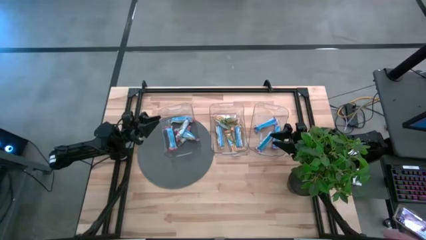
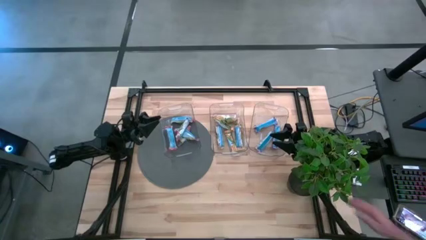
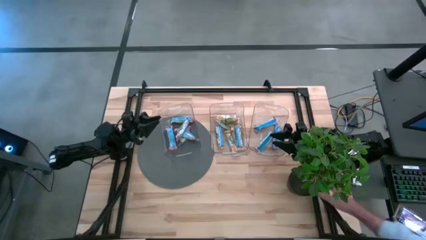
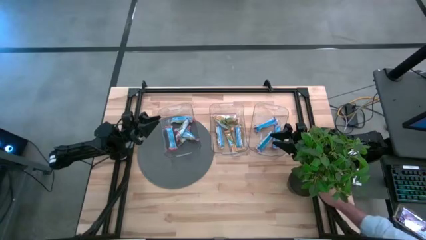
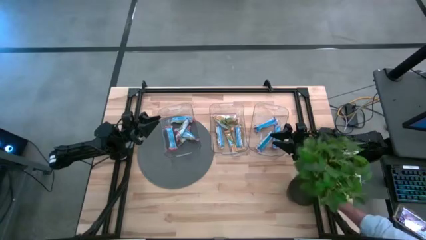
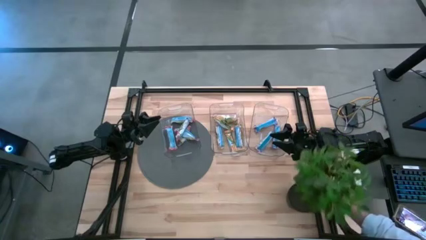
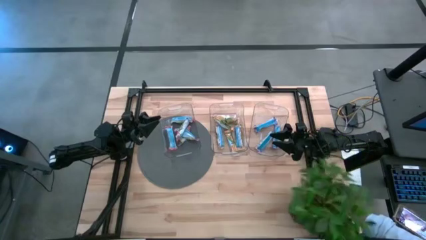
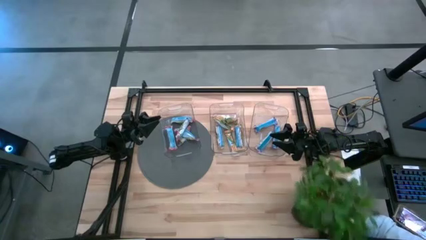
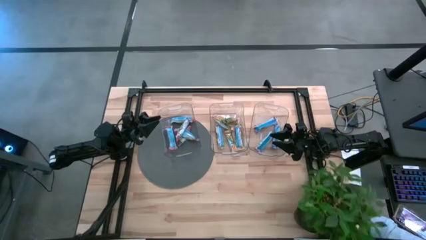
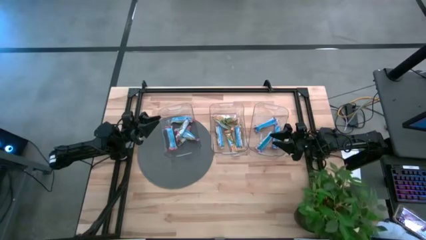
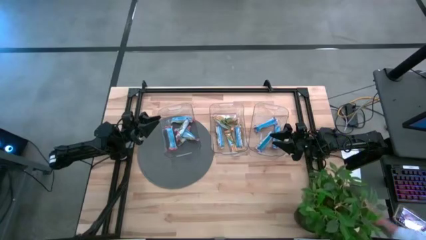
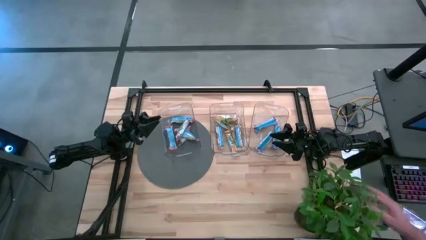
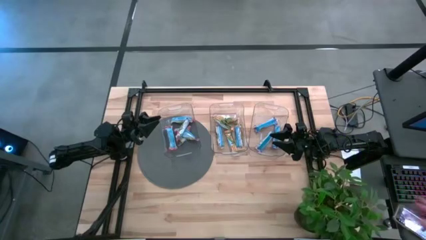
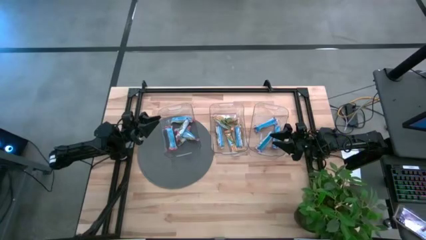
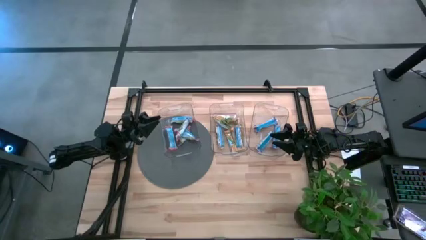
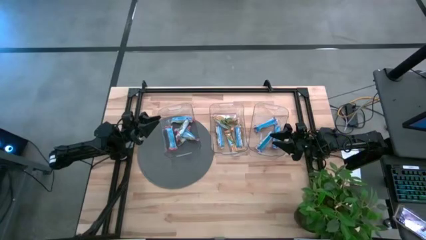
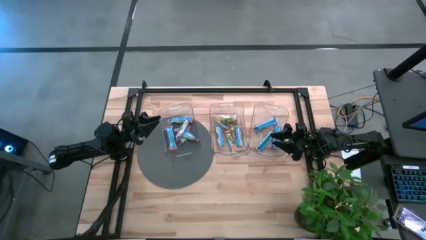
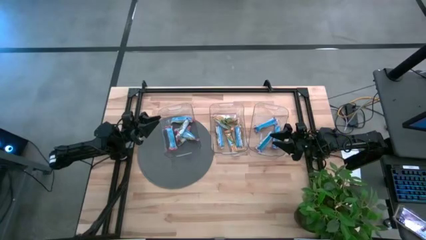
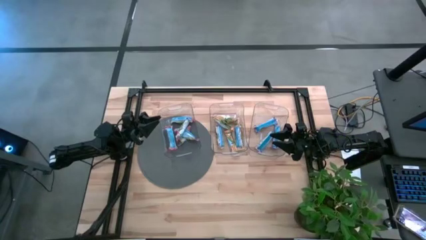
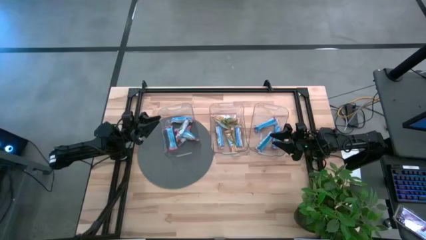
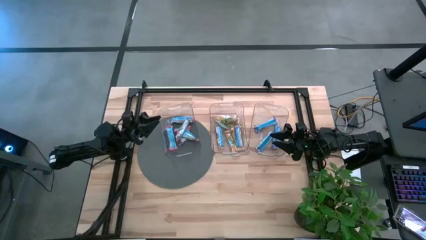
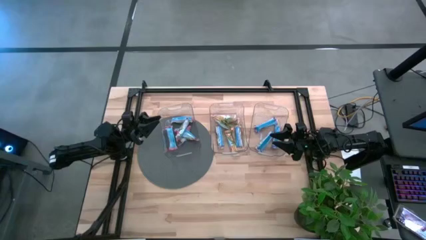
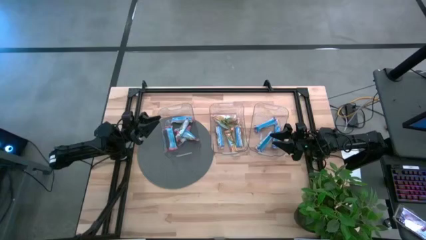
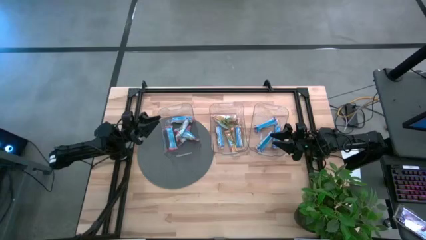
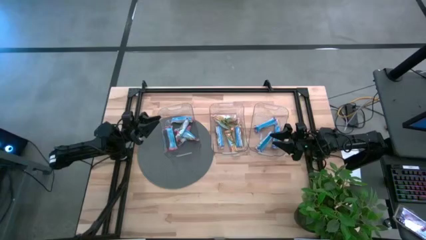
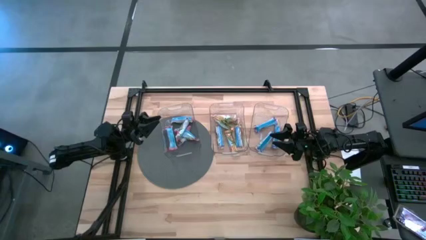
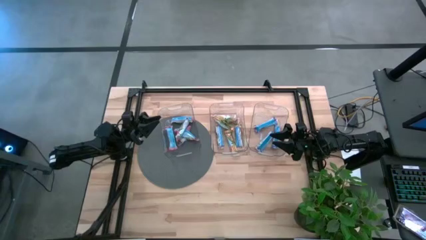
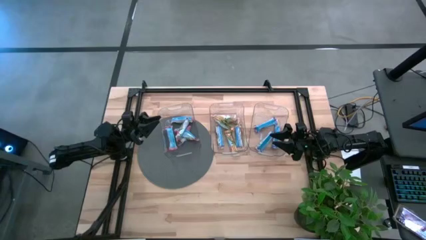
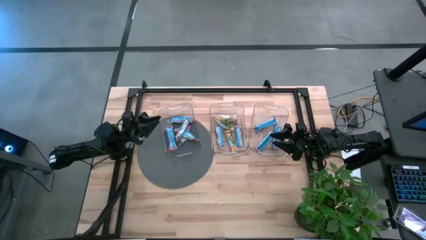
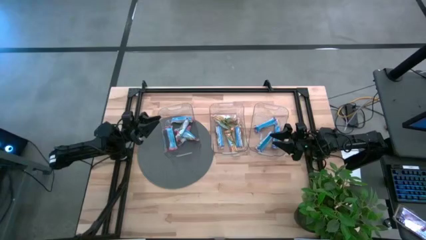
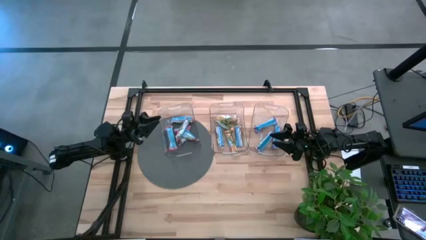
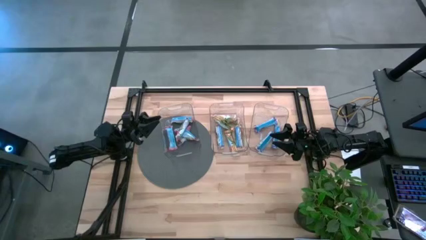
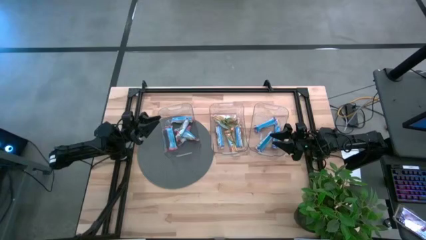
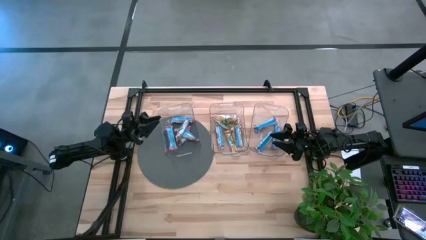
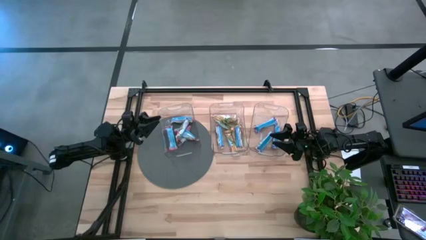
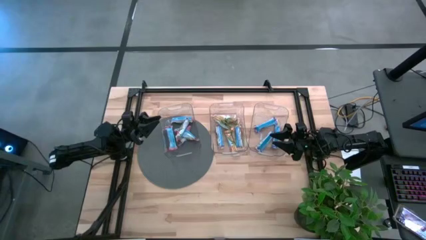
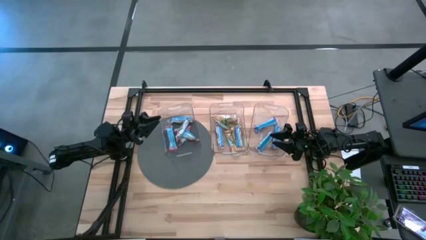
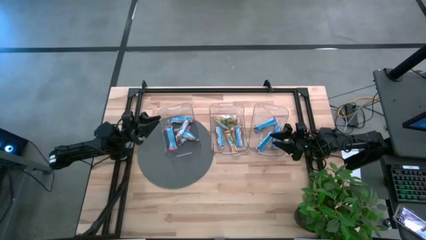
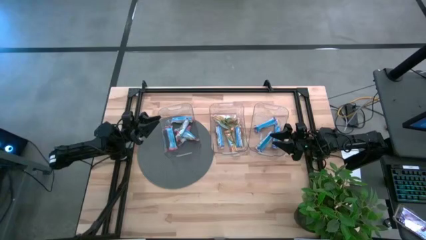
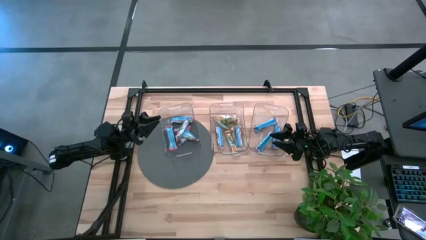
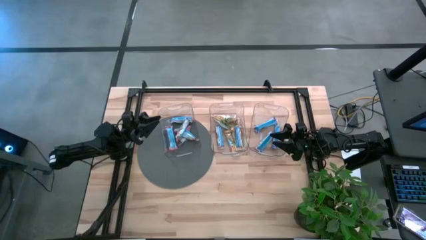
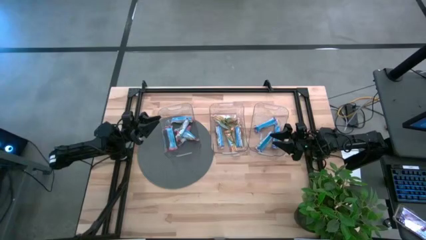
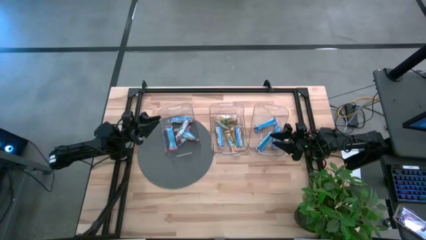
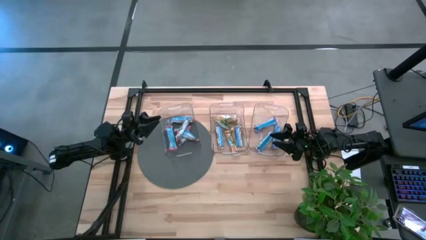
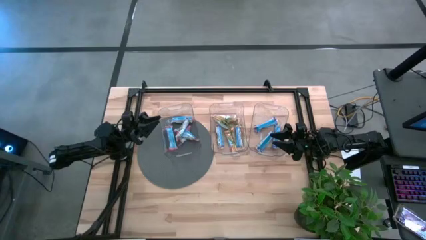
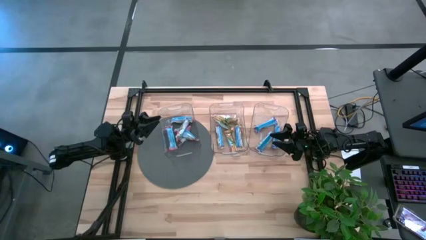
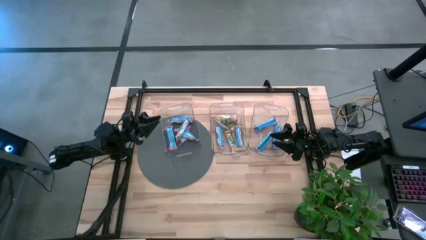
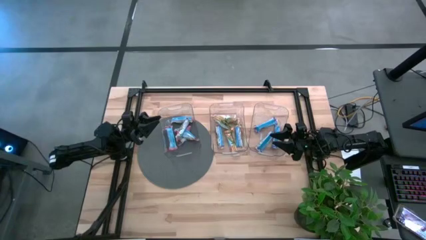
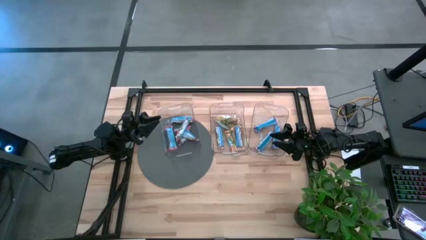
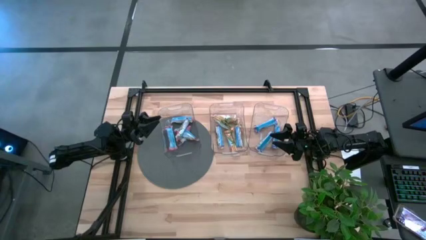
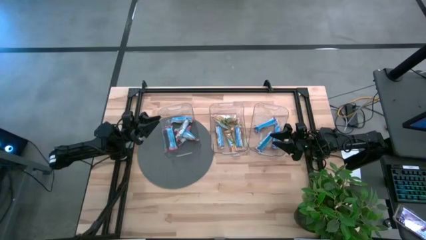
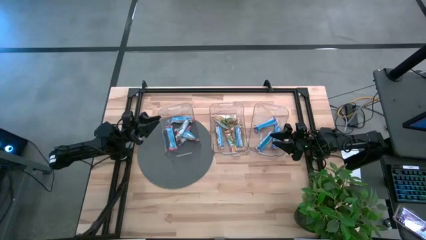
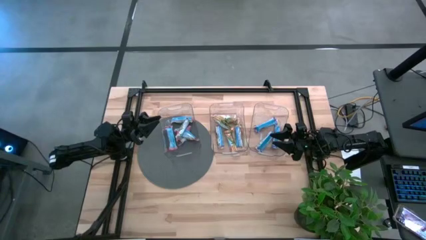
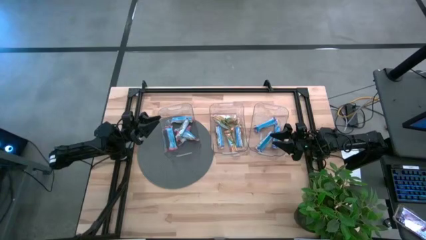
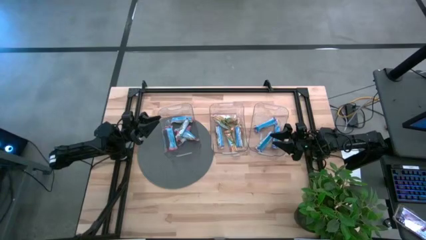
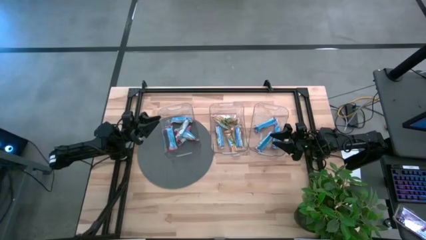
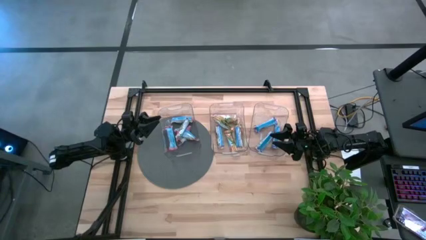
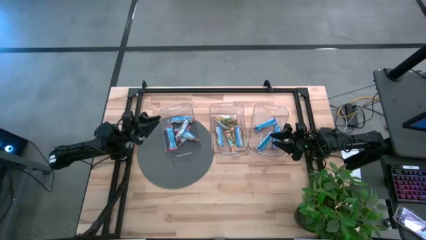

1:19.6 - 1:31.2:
Task: Pick and place Granola Bars by type
Return to Home Position

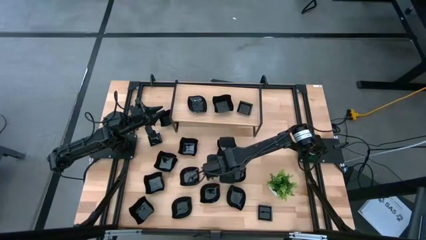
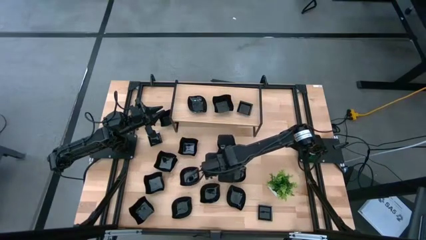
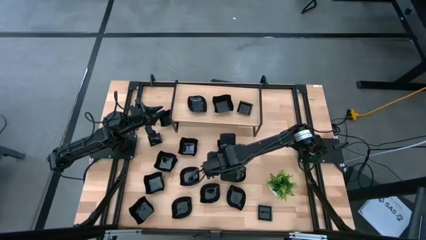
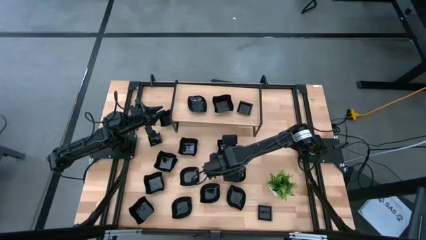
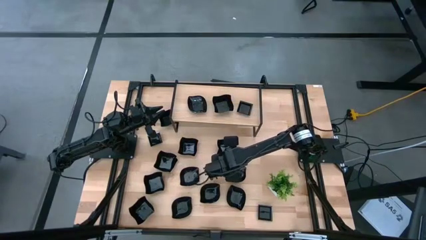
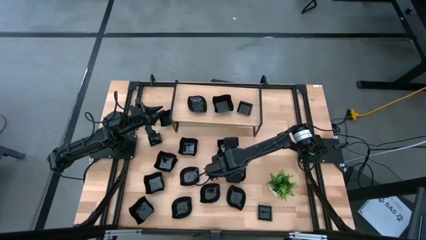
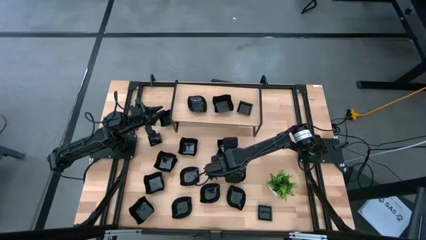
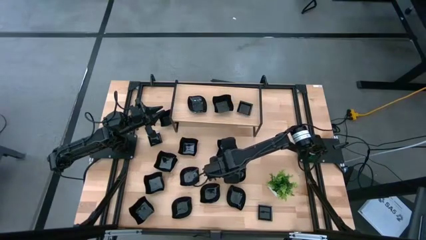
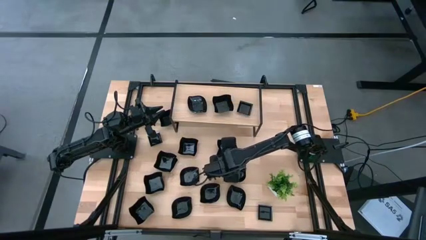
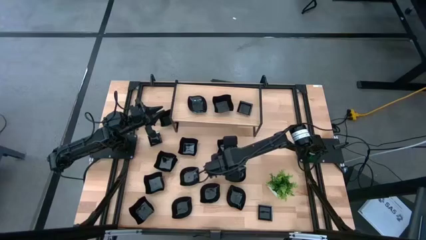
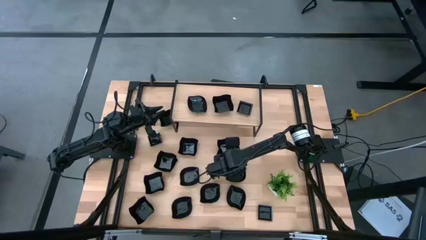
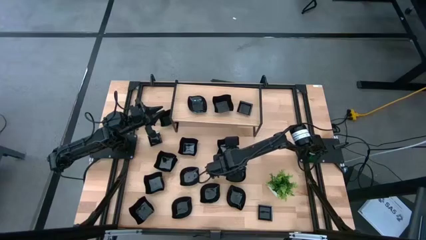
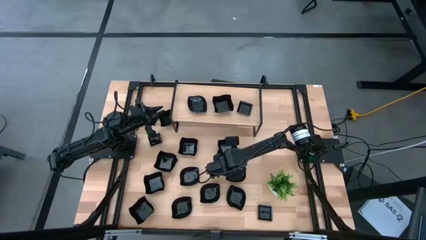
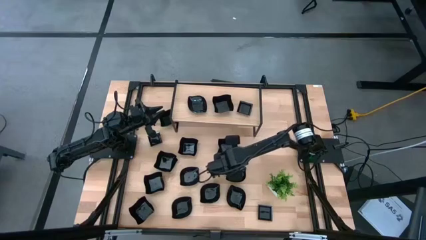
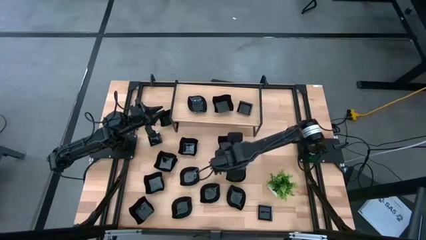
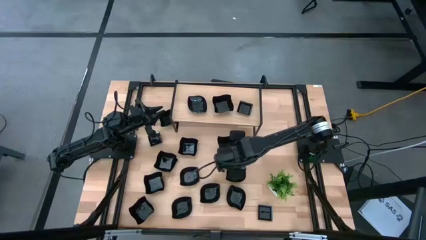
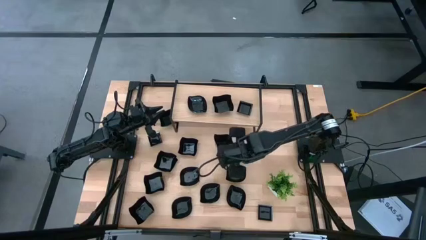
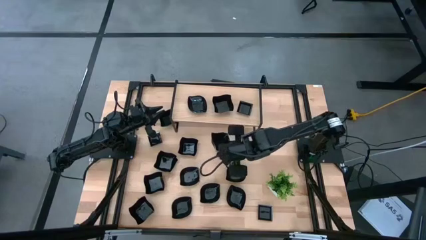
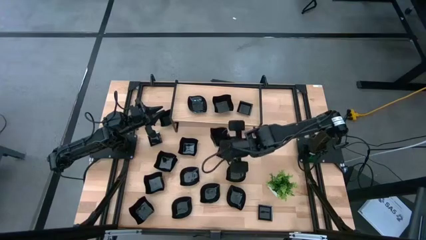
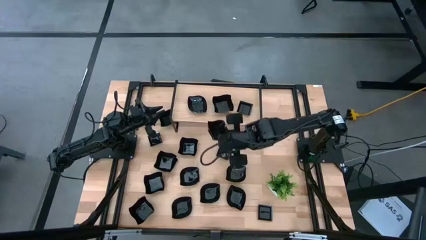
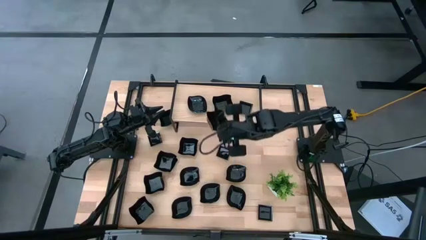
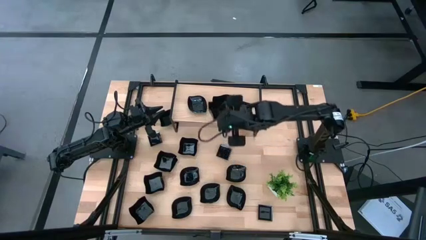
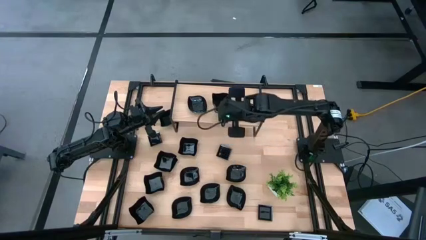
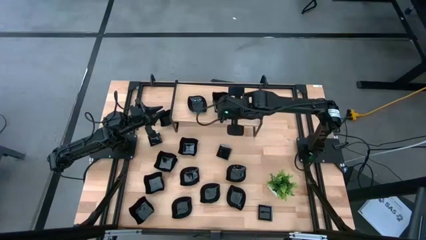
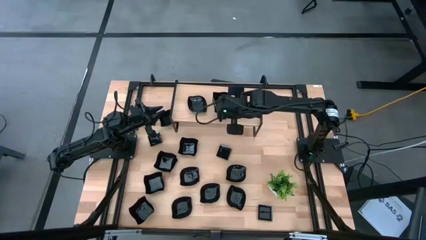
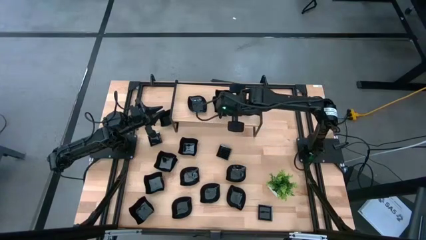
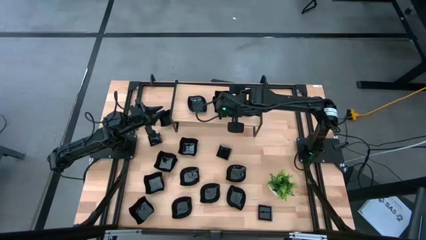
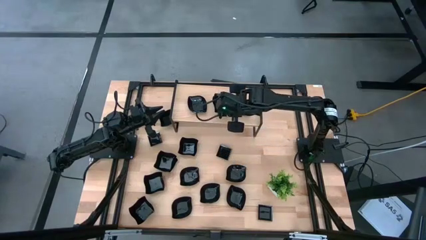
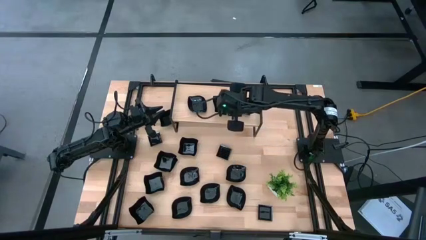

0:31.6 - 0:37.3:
Task: Pick & Place Mini shaped plates
Stack the distorted square plate on top of the distorted square plate on the shelf
